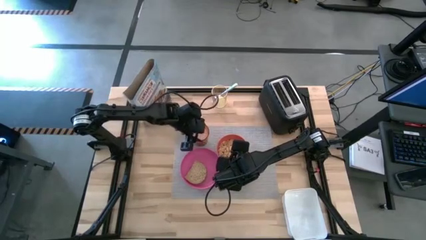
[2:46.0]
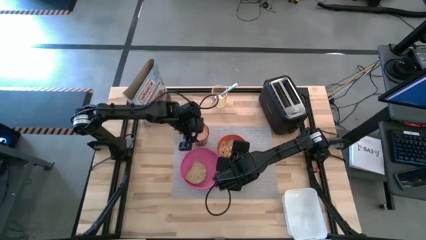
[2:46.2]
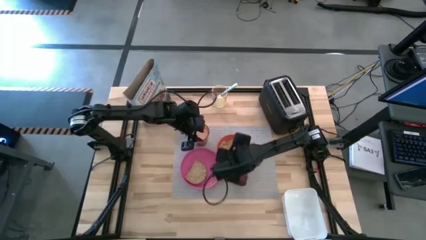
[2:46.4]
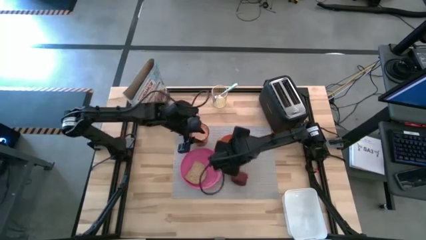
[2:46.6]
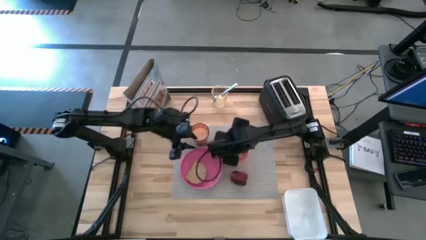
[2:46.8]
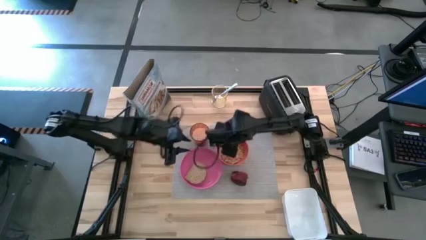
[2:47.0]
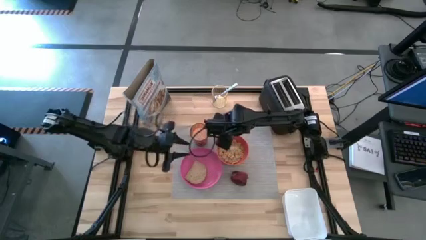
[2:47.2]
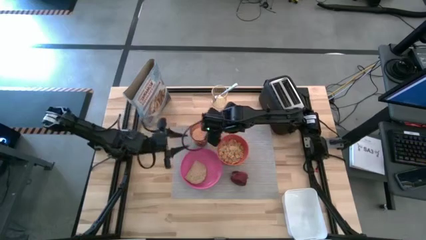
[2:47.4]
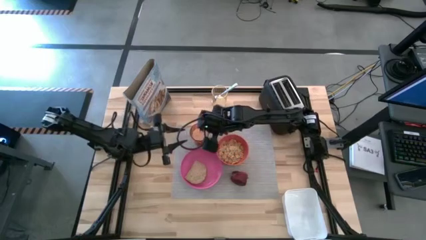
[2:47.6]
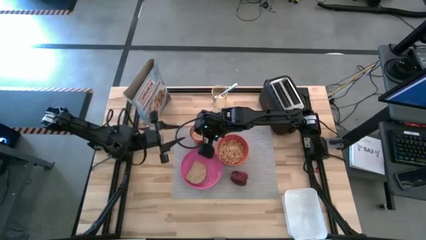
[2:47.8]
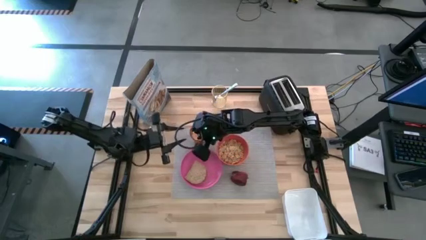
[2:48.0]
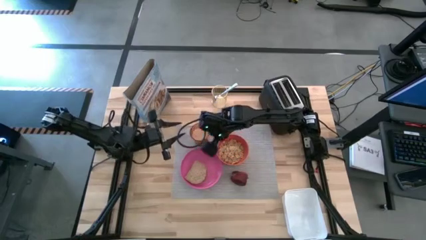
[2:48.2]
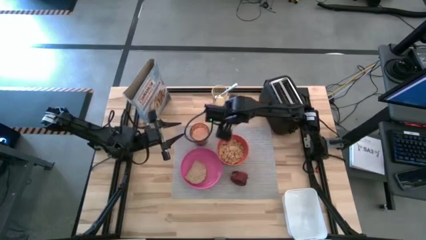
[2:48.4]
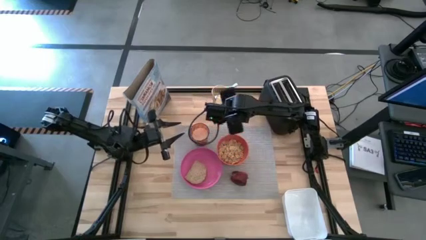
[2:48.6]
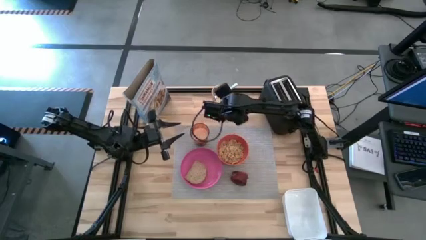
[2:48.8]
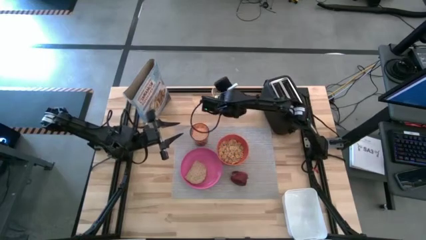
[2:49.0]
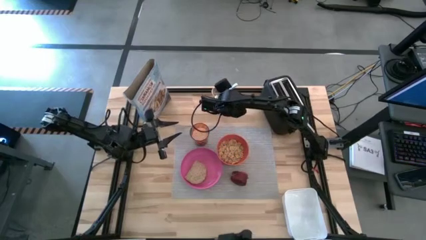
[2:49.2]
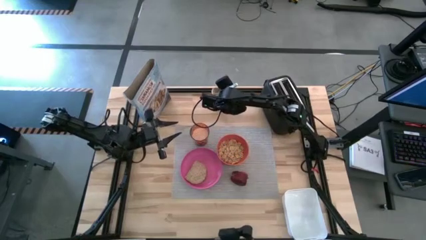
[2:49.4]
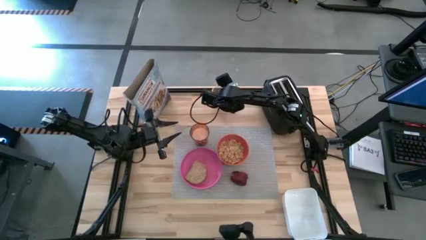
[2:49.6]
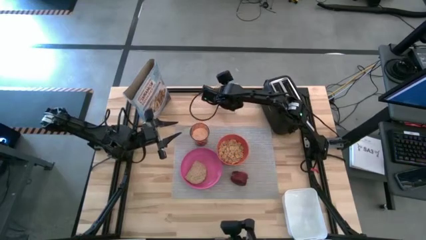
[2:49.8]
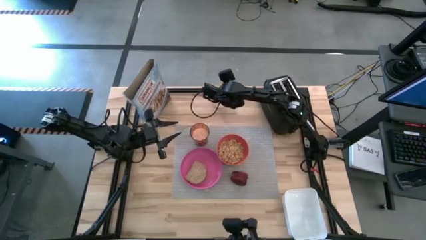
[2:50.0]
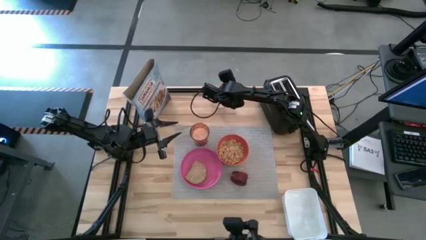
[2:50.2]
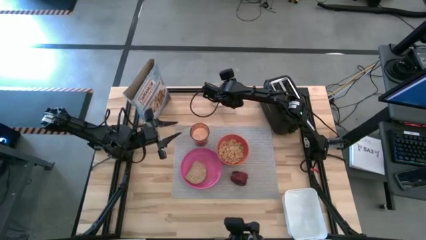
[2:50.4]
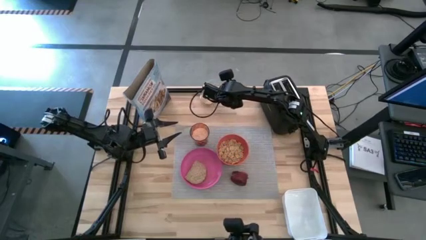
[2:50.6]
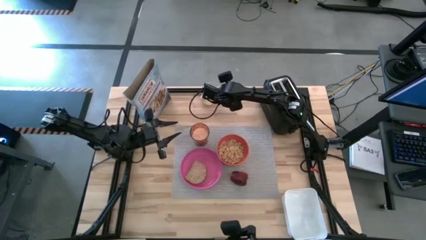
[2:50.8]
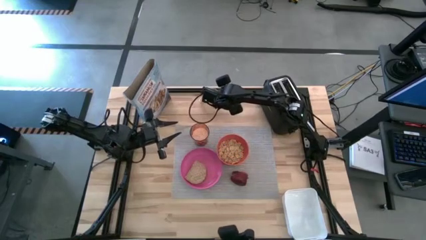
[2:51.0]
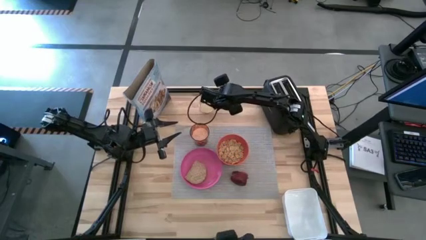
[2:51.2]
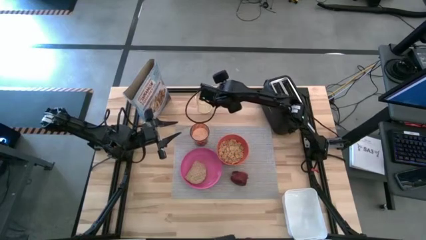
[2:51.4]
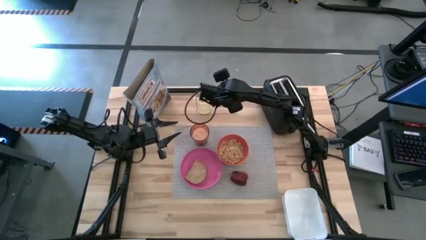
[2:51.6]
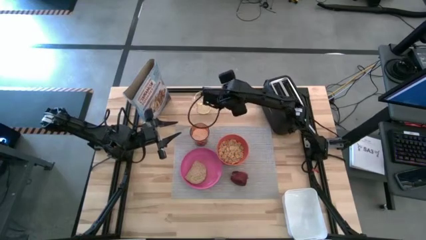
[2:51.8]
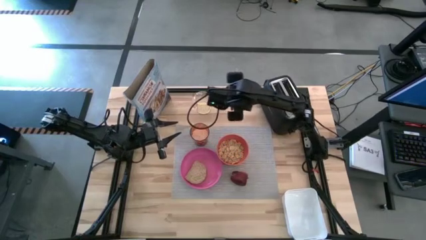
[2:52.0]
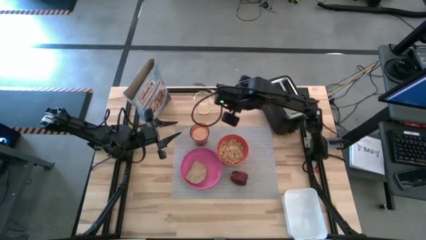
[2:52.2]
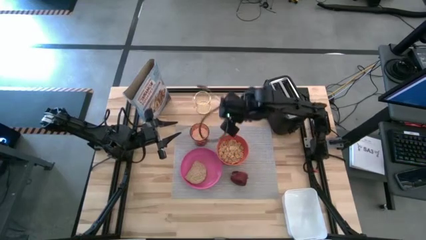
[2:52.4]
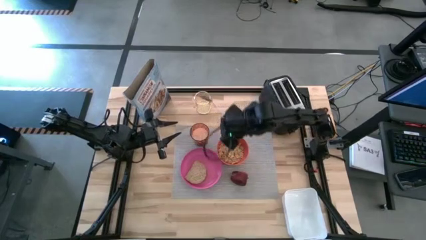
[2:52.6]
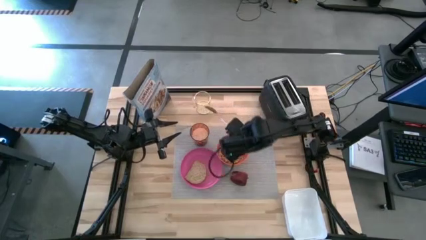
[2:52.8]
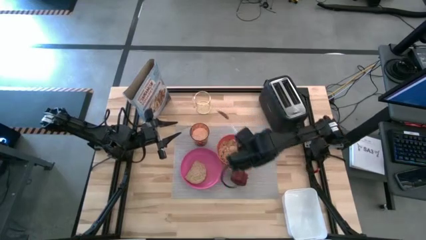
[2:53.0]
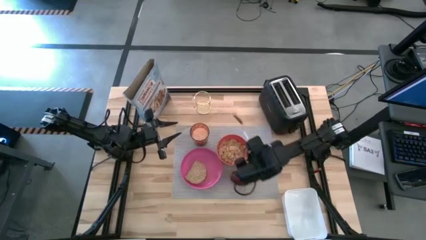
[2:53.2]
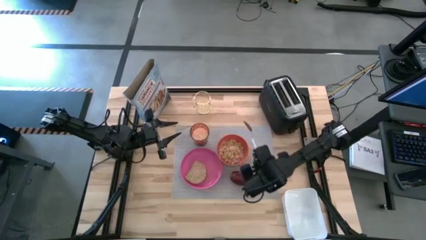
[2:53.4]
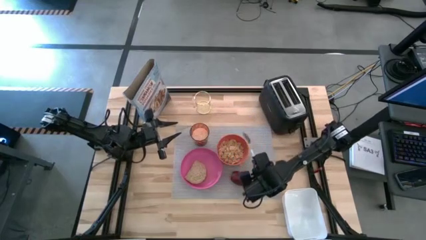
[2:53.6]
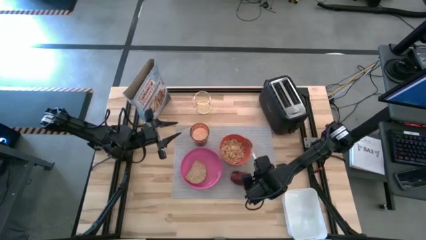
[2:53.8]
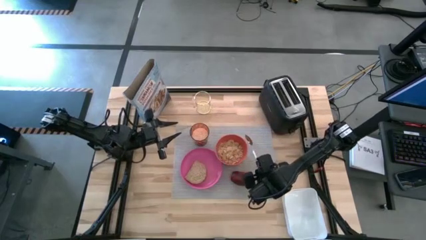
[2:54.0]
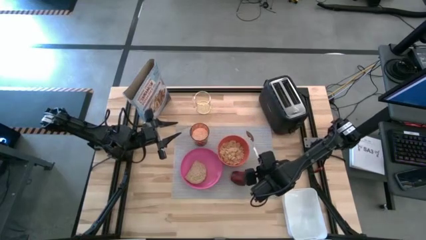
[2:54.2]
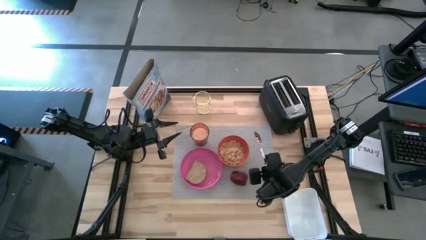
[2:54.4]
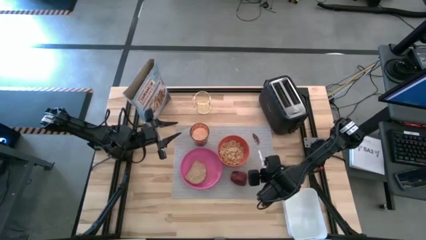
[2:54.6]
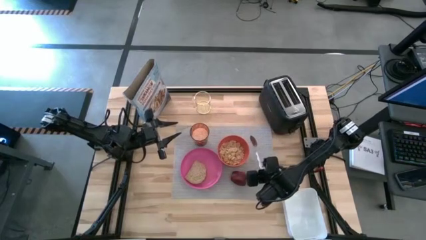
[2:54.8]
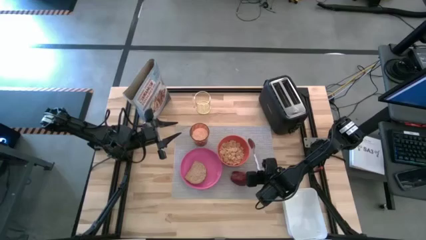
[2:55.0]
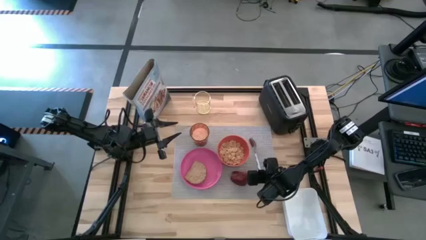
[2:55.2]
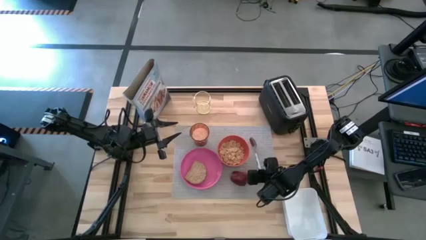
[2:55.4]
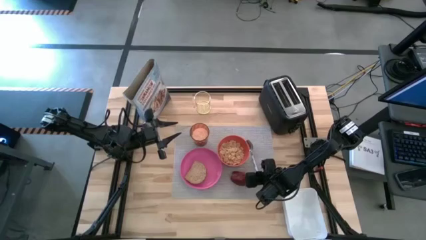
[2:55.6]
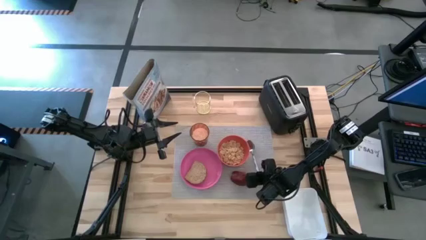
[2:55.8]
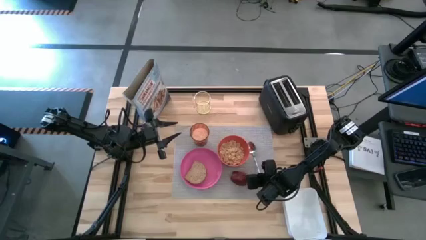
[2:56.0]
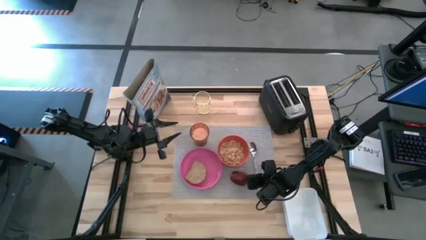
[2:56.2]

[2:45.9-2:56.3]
Task: Arrange a breakfast setting
Put the green spoon on the gray table mat to the right of the orange bowl
